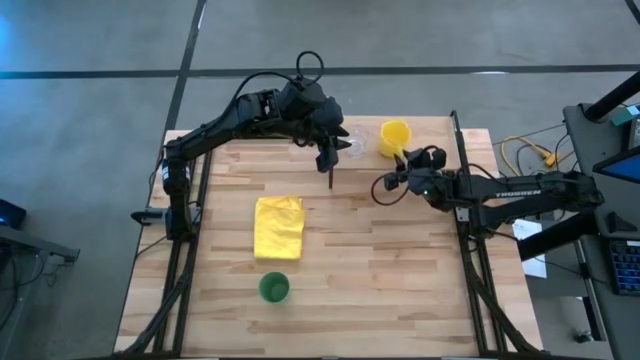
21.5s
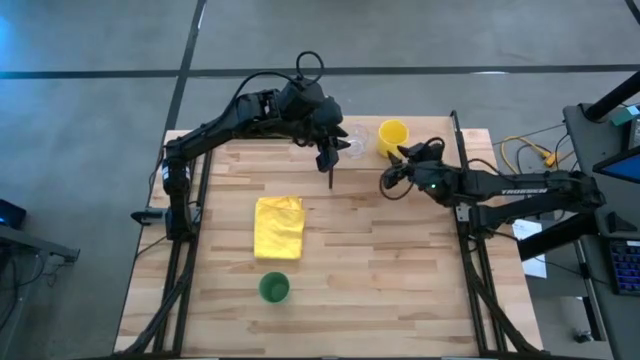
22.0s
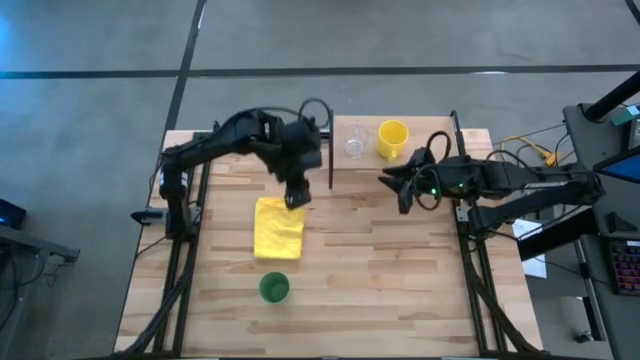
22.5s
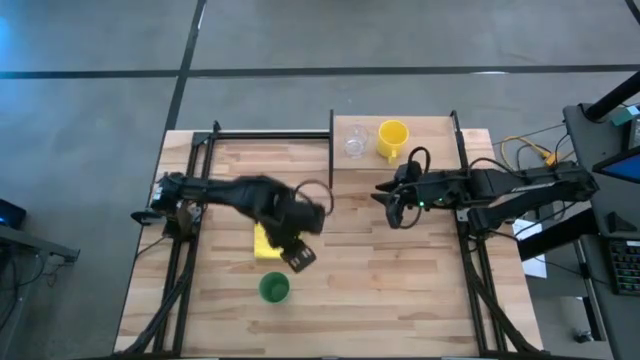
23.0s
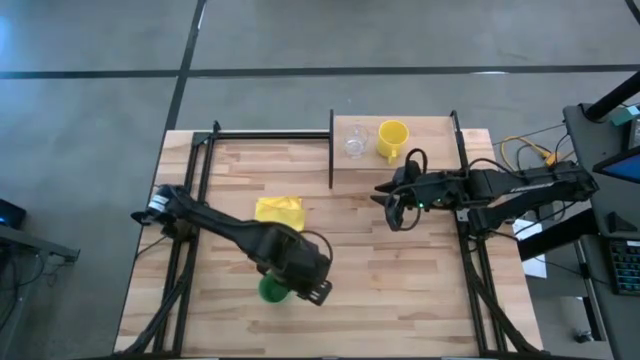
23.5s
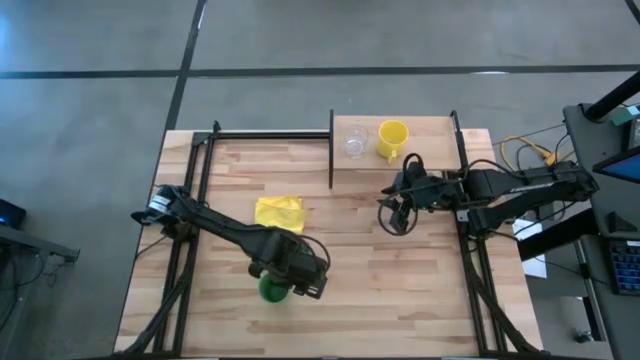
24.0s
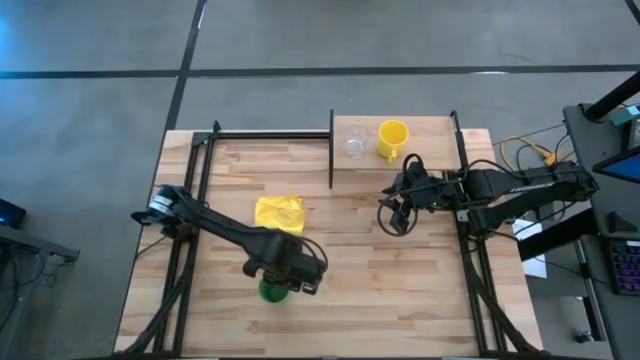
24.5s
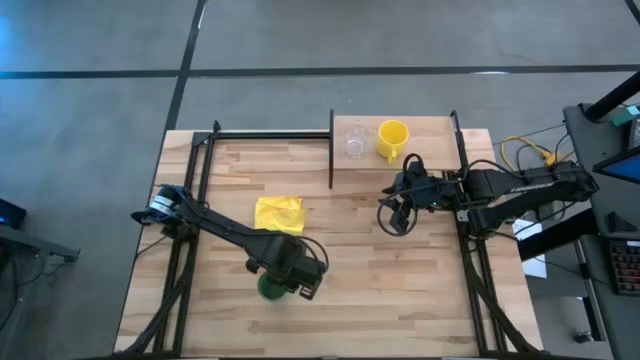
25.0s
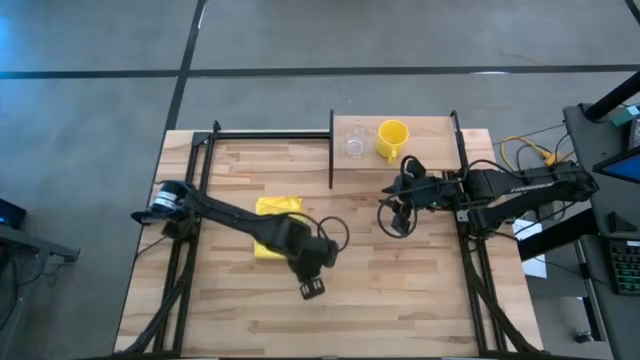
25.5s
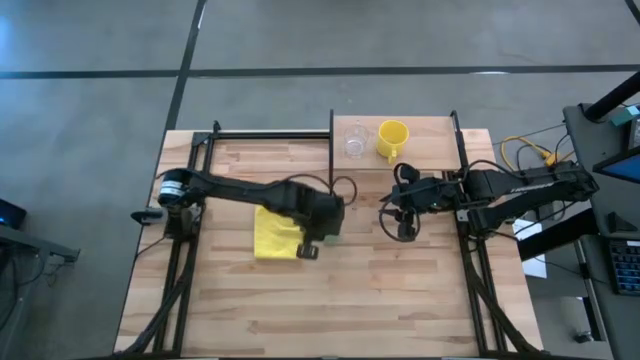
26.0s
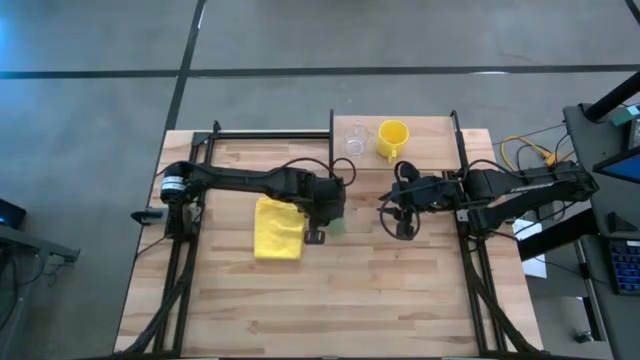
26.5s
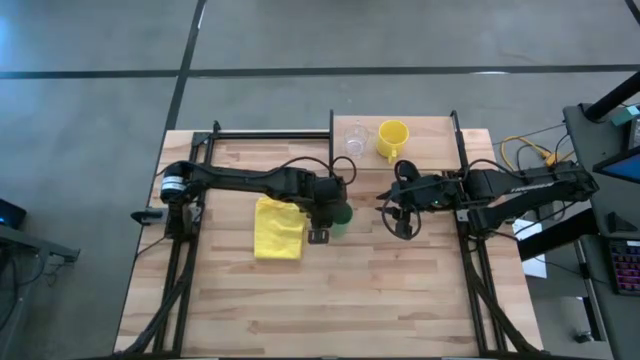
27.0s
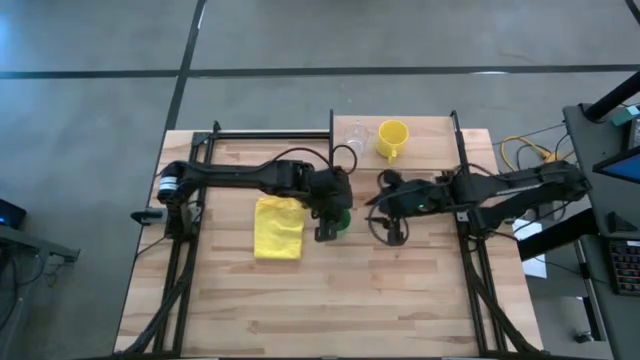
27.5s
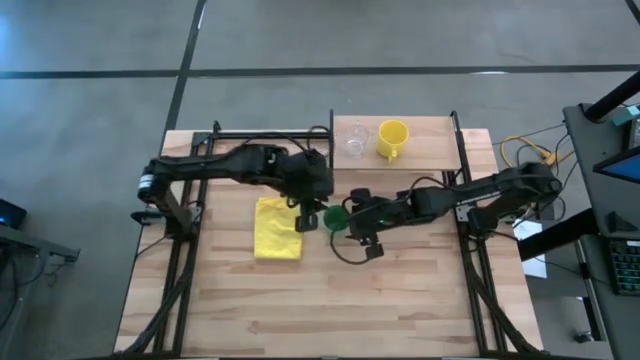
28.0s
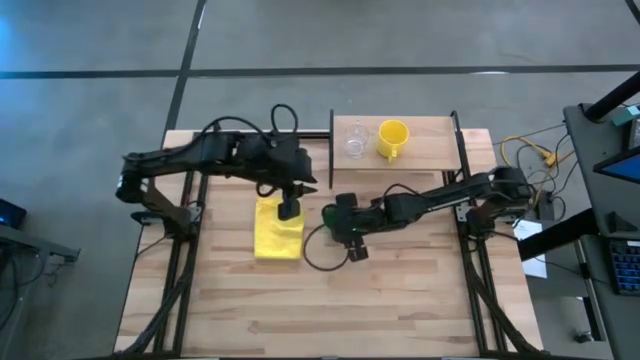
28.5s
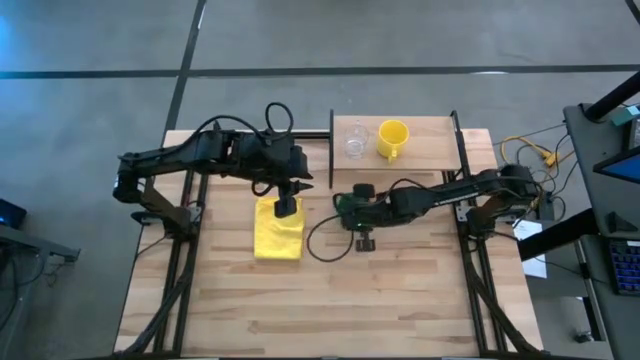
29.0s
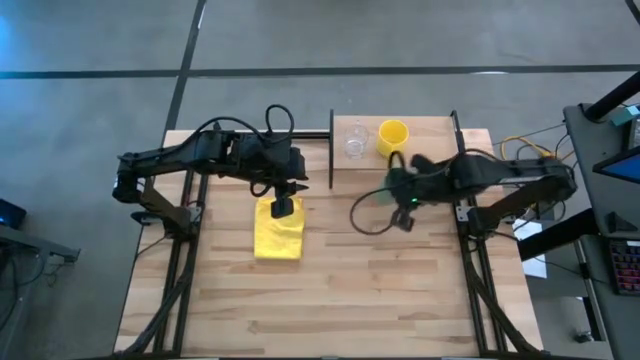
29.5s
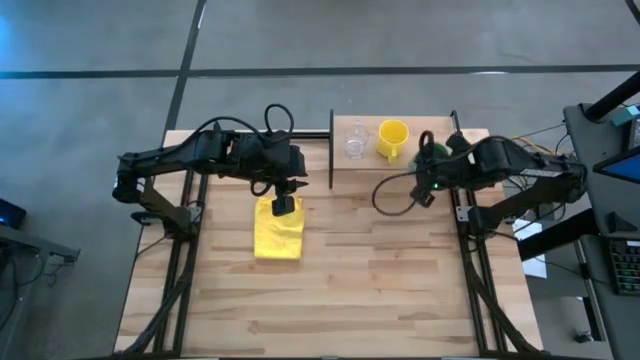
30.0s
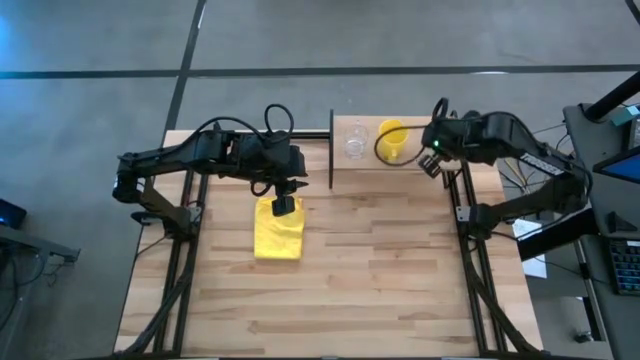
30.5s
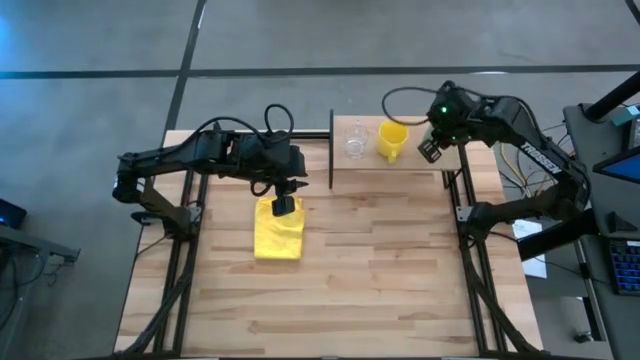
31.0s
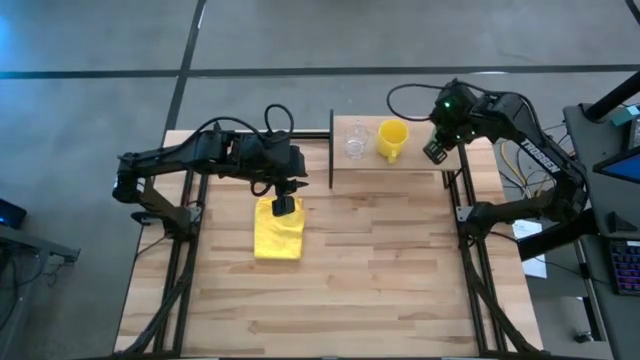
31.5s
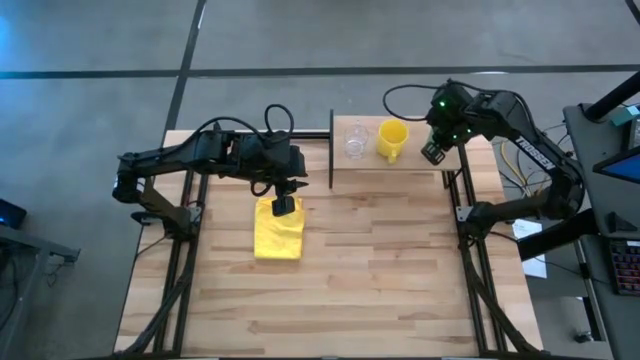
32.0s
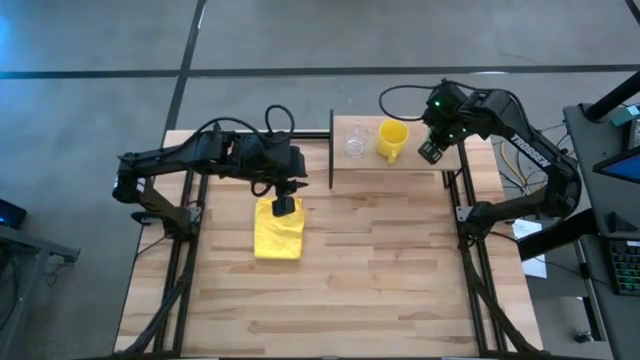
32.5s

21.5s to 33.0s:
Task: Stack small to large cups/mugs on shelf
Put the green cup on the shelf

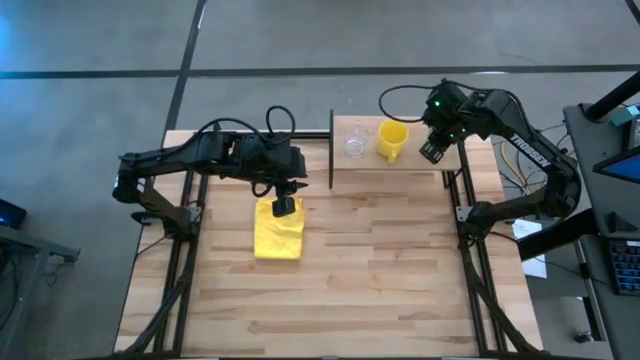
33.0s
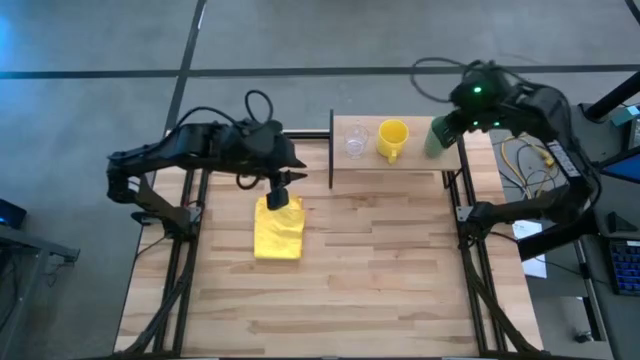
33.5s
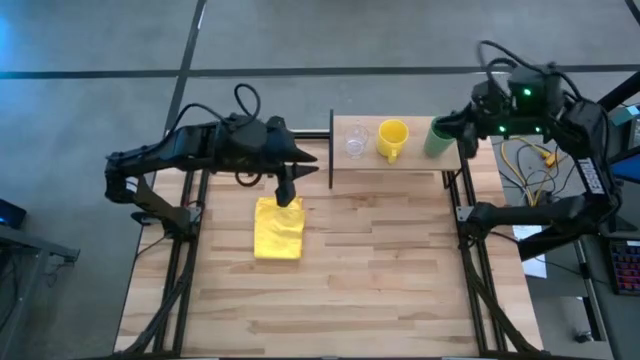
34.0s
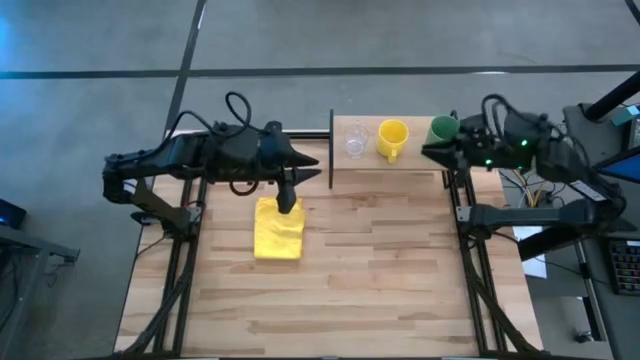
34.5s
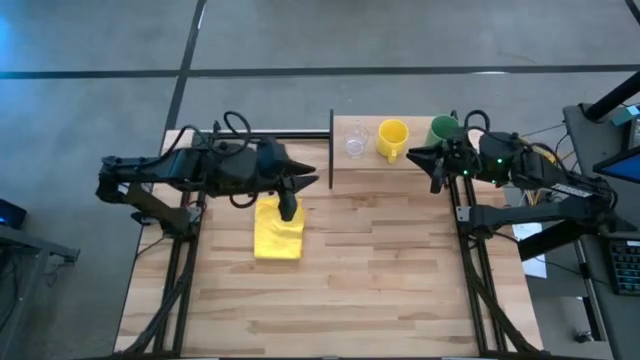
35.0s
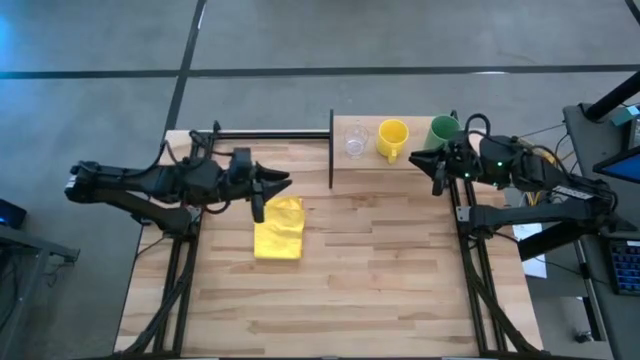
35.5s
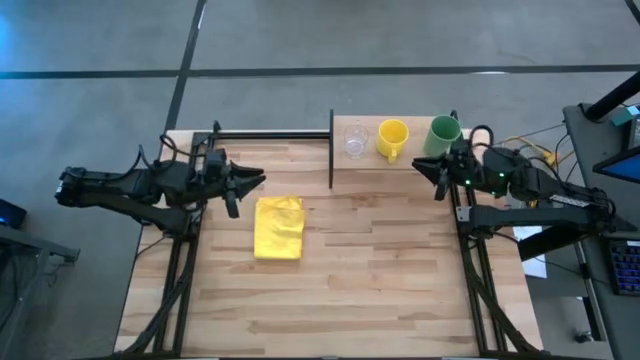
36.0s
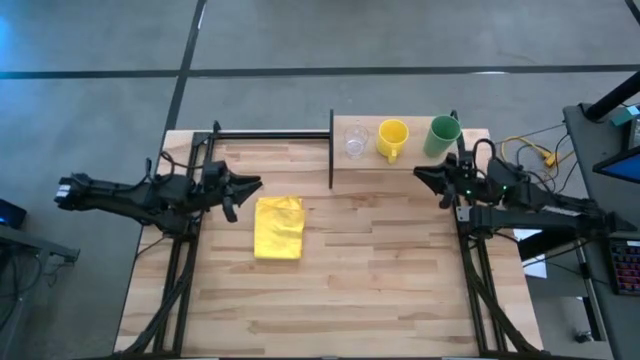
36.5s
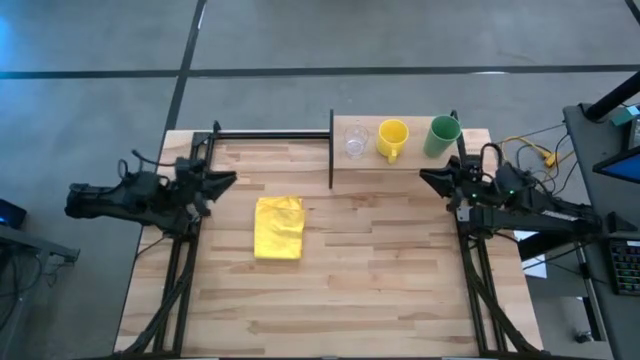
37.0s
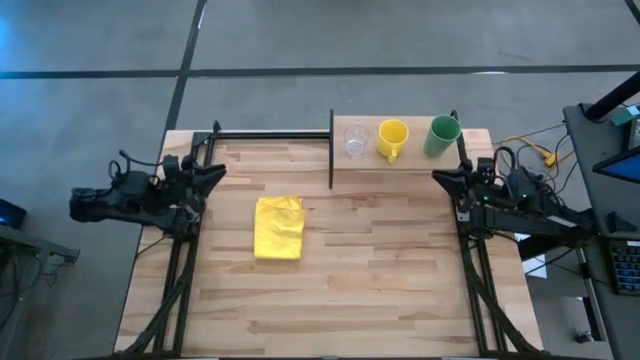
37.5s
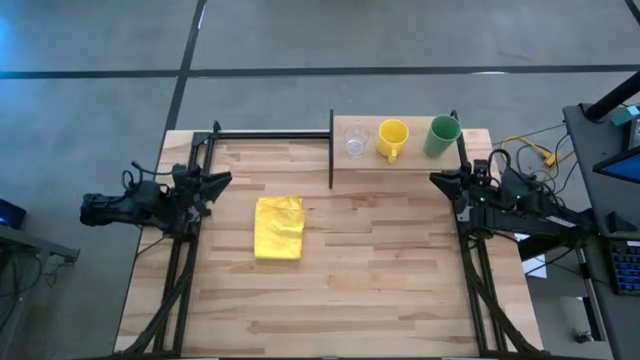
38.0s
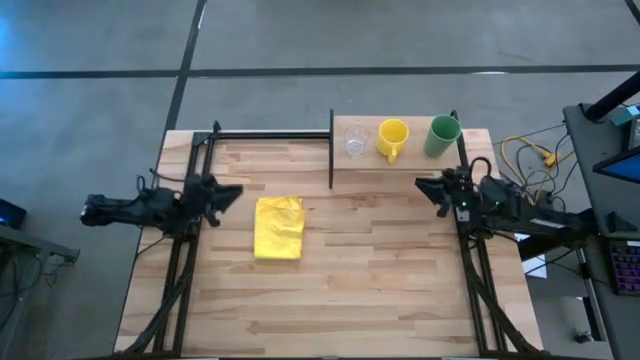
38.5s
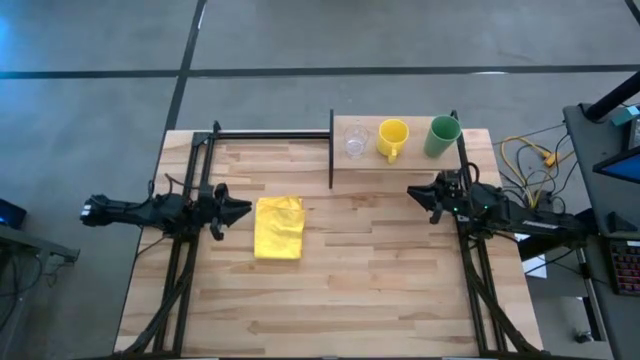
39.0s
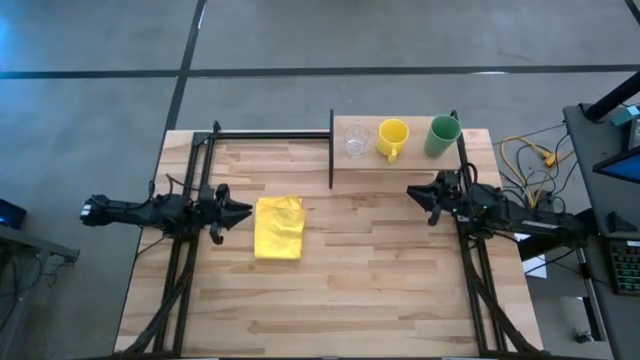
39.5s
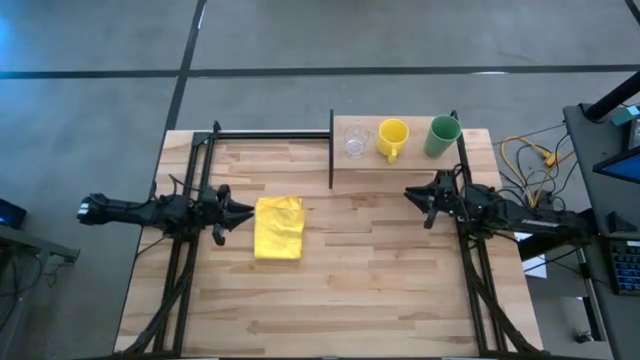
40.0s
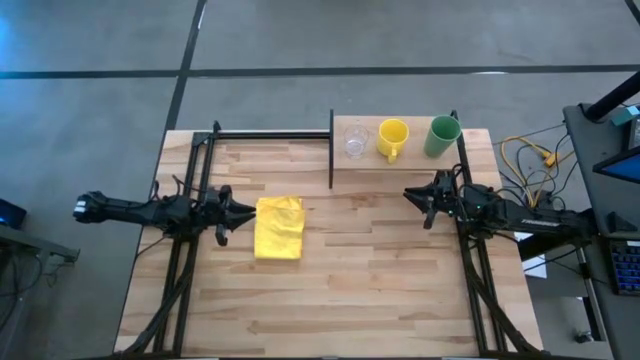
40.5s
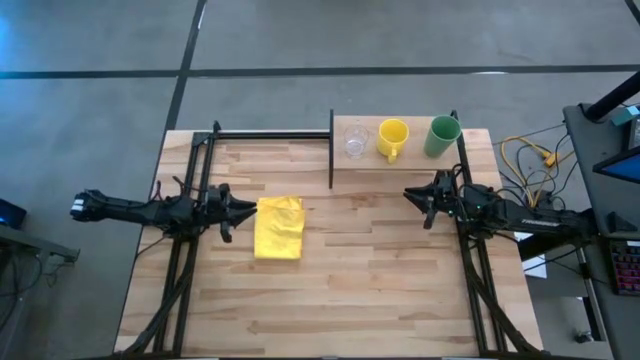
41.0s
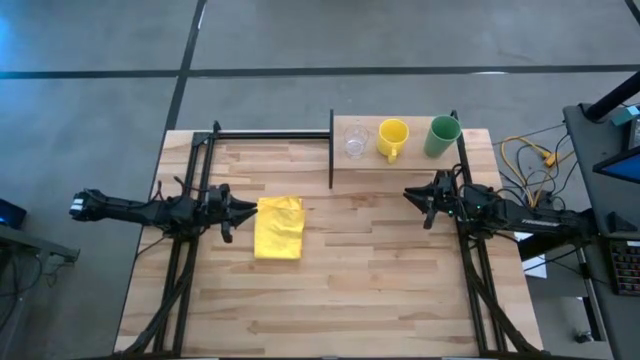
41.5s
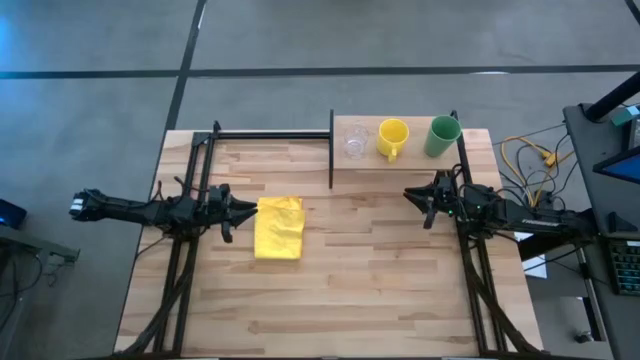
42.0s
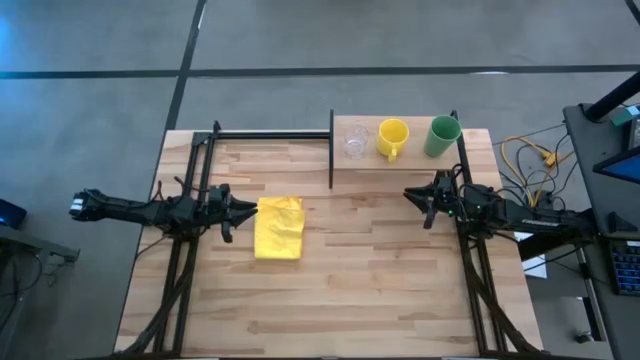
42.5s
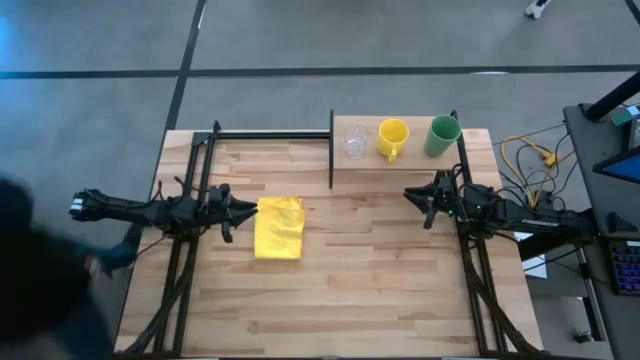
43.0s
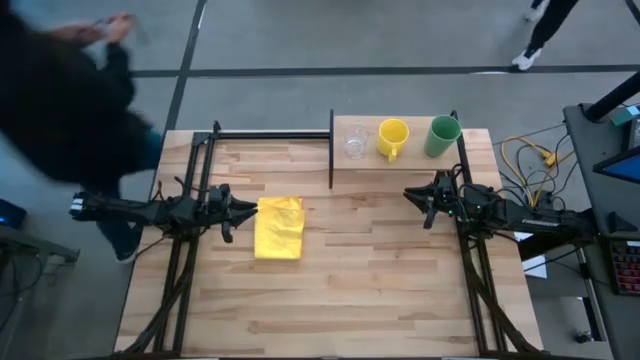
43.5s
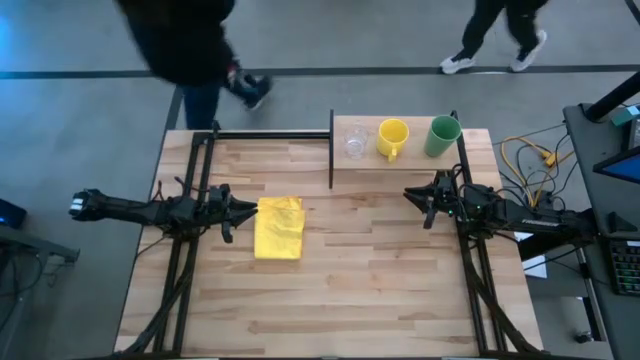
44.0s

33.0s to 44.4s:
Return to Home Position
